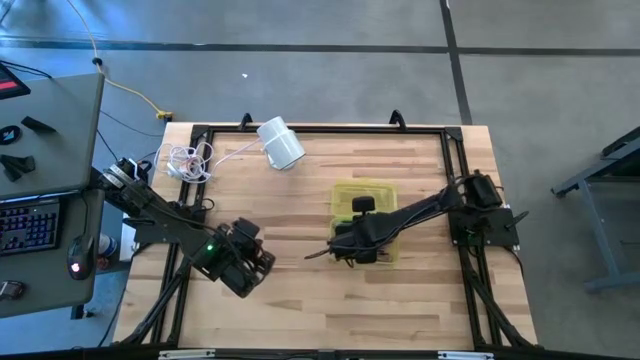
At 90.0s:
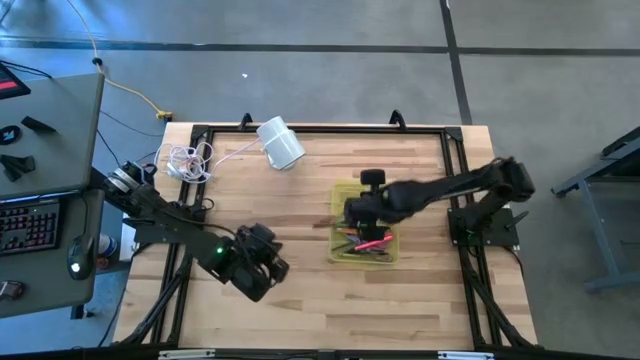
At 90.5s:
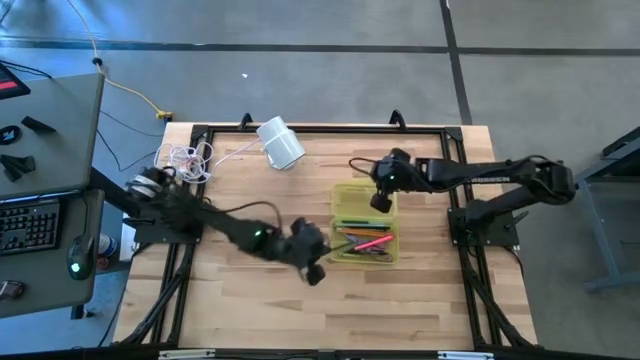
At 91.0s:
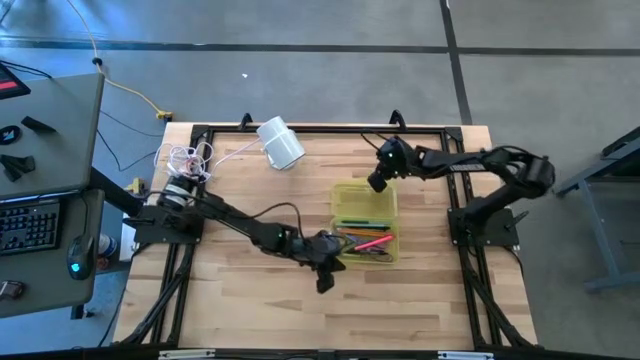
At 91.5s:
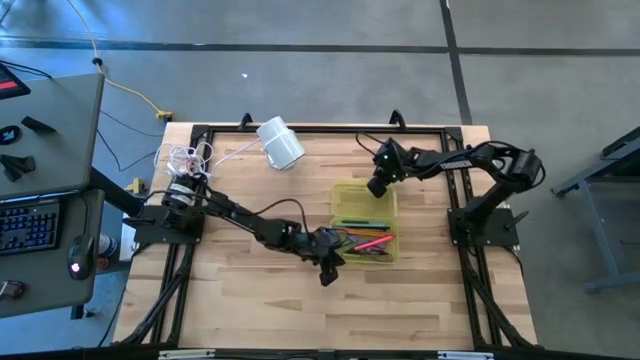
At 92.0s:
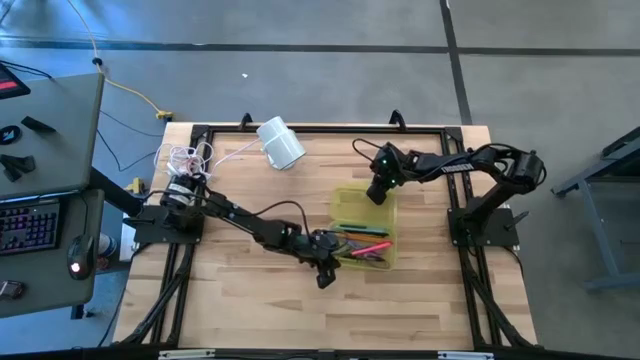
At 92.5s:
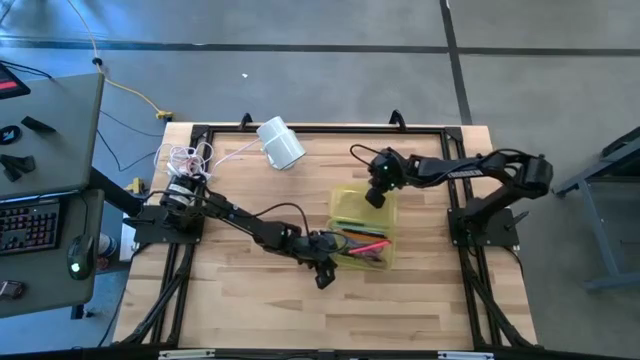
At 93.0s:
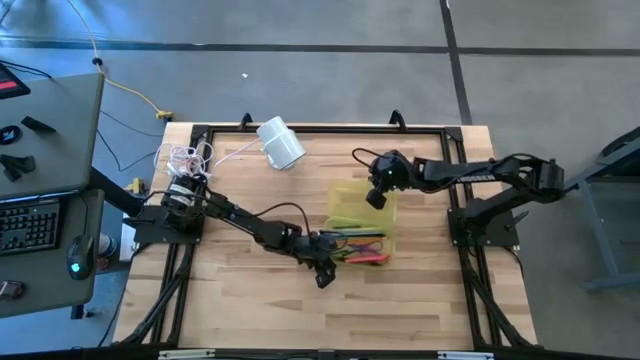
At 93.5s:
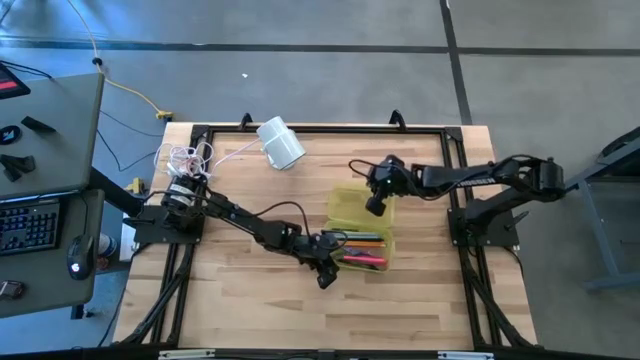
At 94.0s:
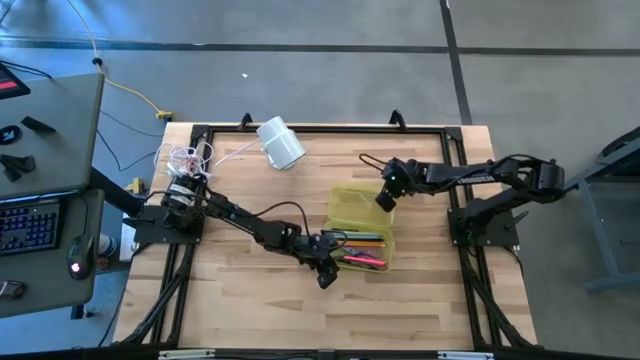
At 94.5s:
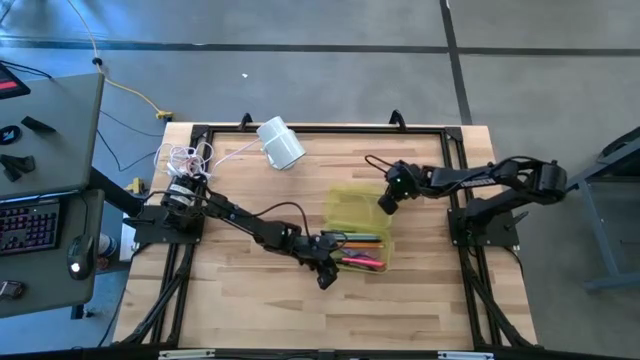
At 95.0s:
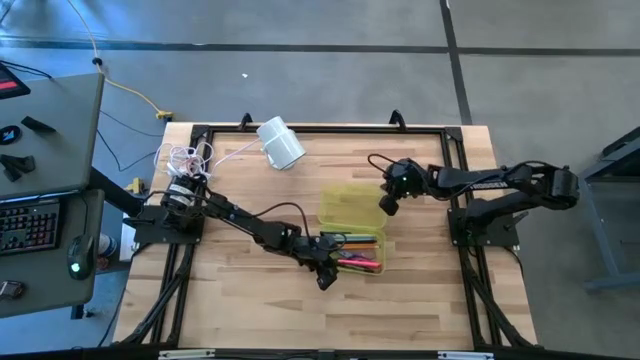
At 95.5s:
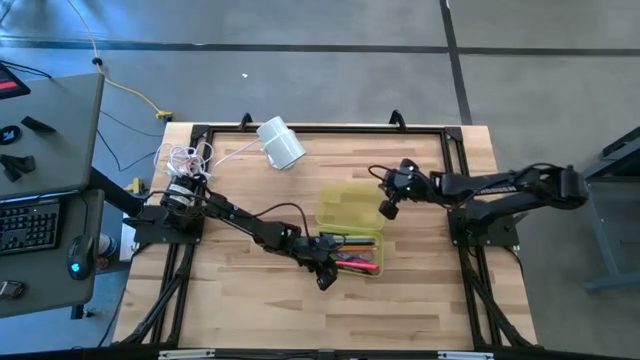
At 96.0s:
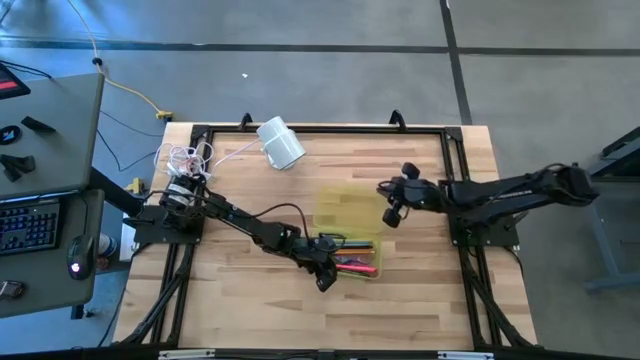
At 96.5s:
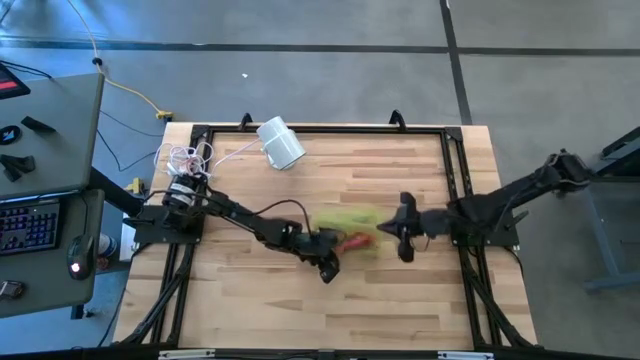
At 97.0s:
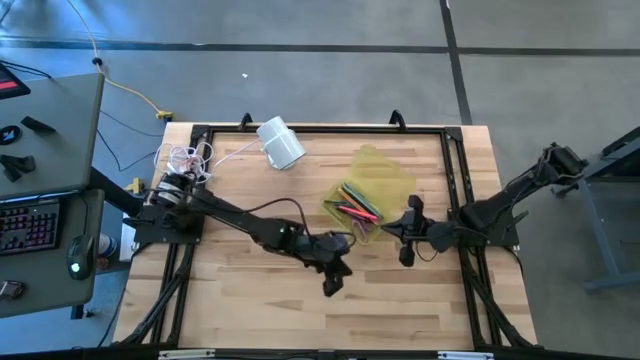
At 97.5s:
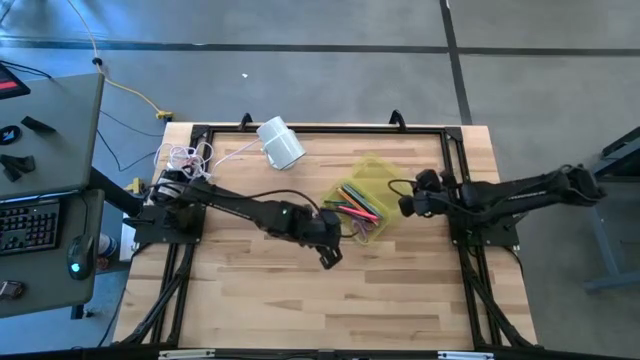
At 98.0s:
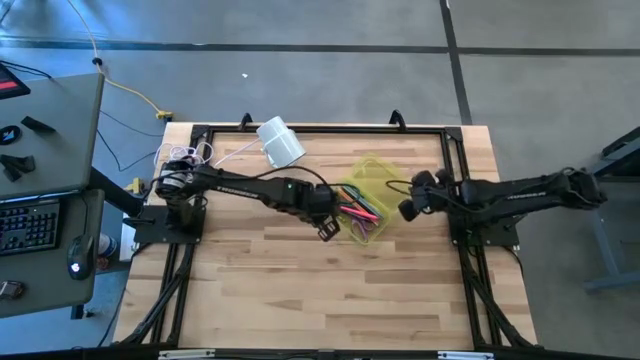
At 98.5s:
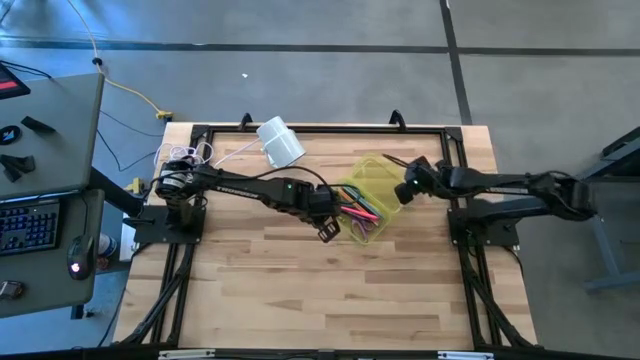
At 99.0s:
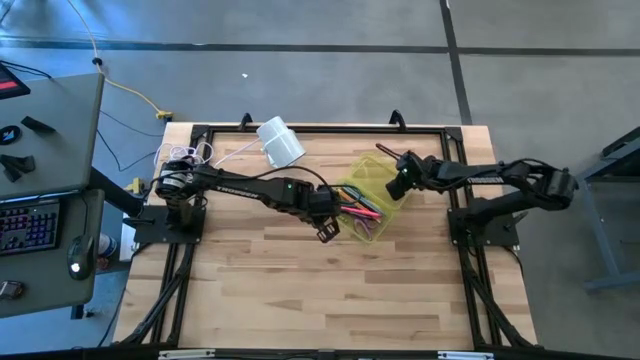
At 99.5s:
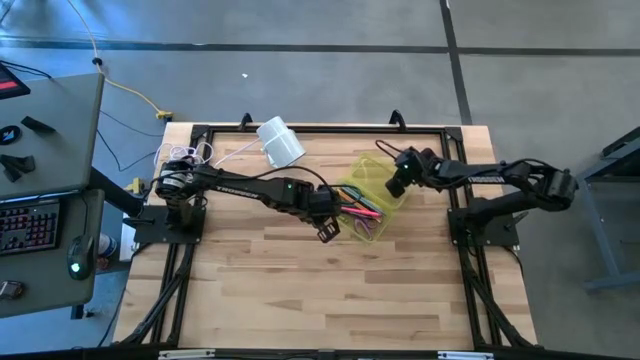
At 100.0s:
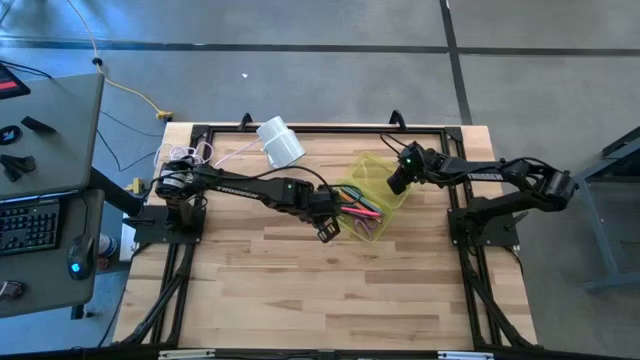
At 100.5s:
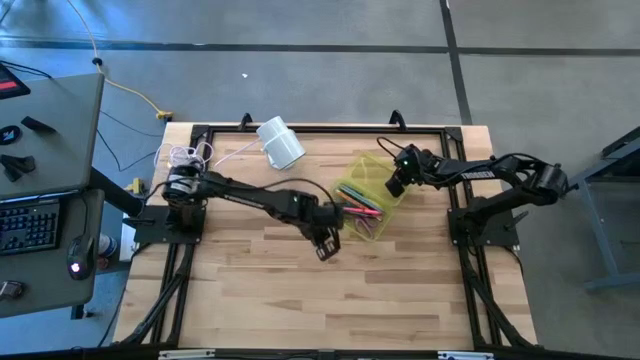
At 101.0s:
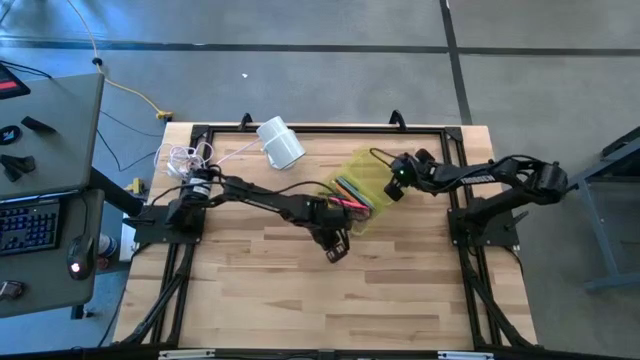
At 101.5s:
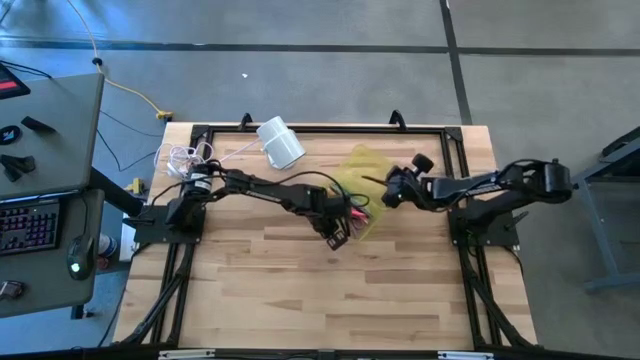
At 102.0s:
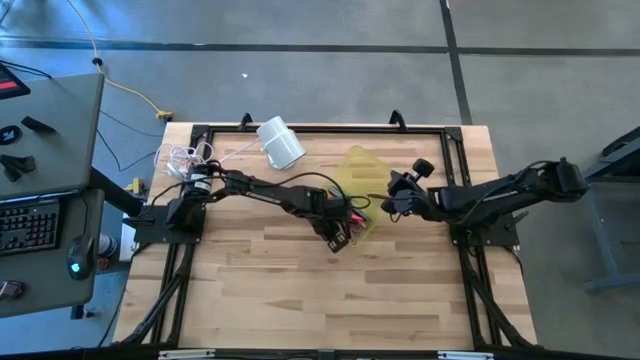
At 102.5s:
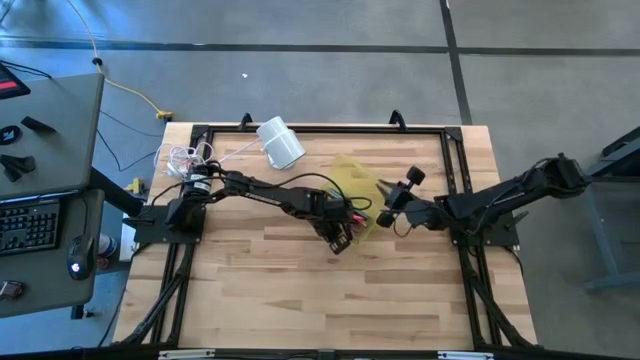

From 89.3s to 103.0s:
Task: Pick & place school supplies into a supply box
Close the supply box

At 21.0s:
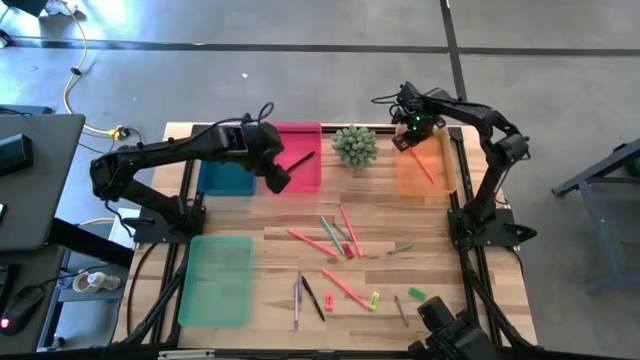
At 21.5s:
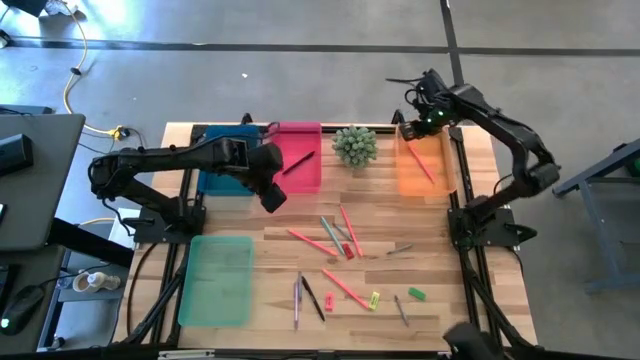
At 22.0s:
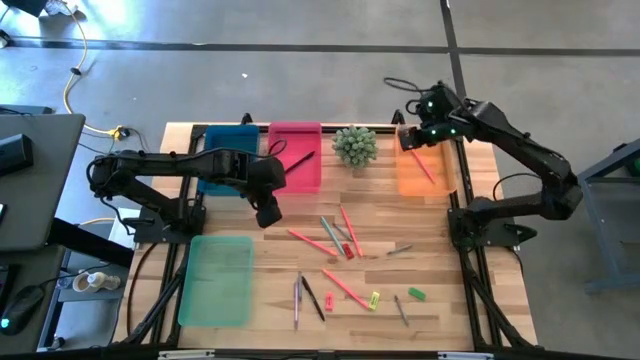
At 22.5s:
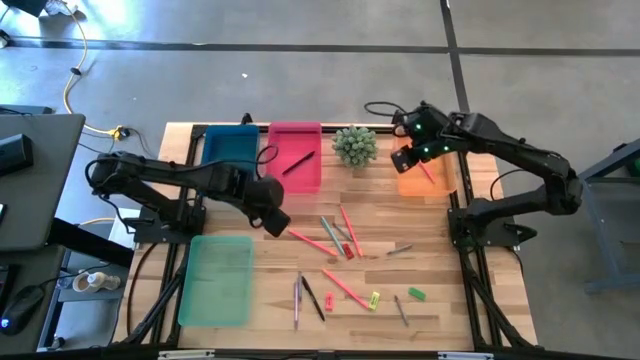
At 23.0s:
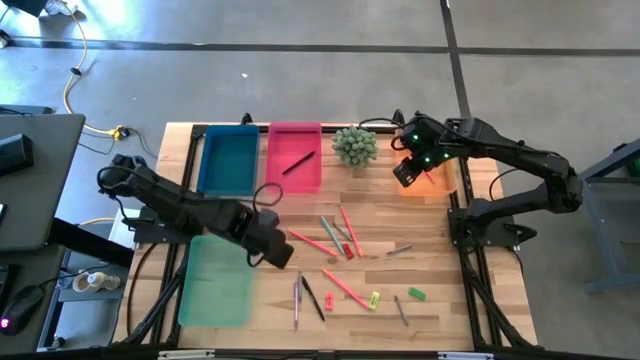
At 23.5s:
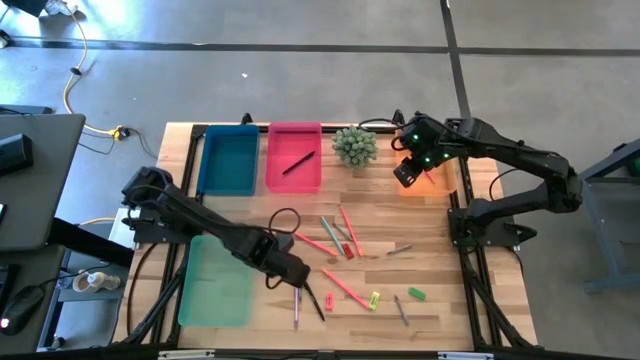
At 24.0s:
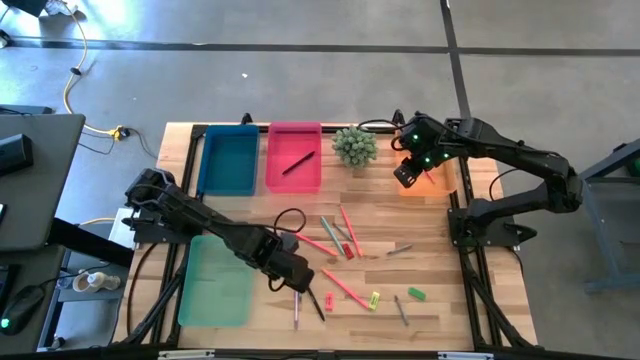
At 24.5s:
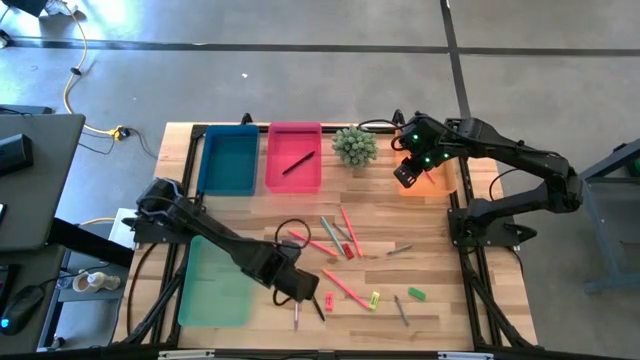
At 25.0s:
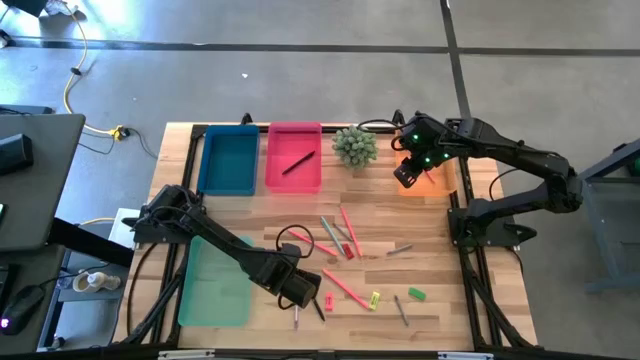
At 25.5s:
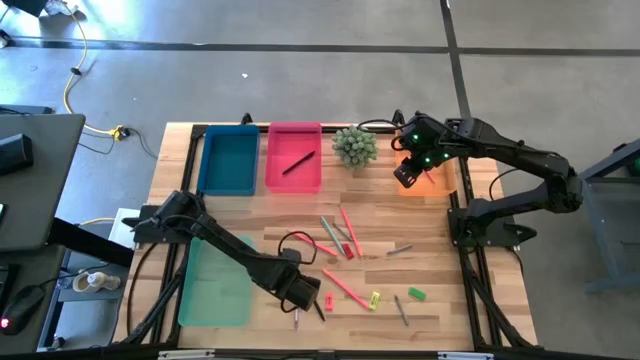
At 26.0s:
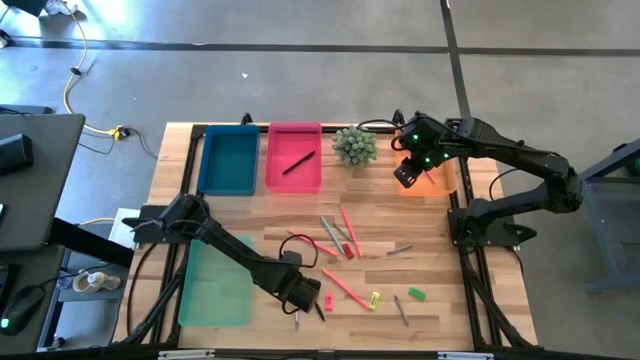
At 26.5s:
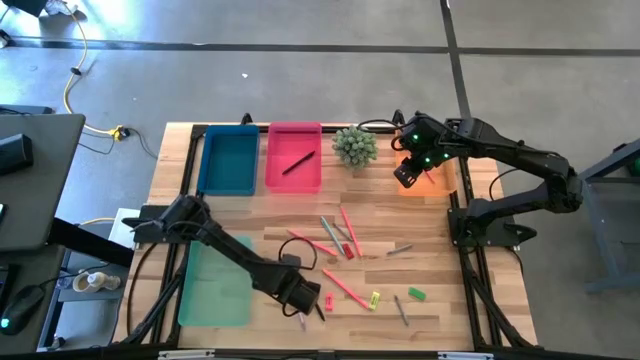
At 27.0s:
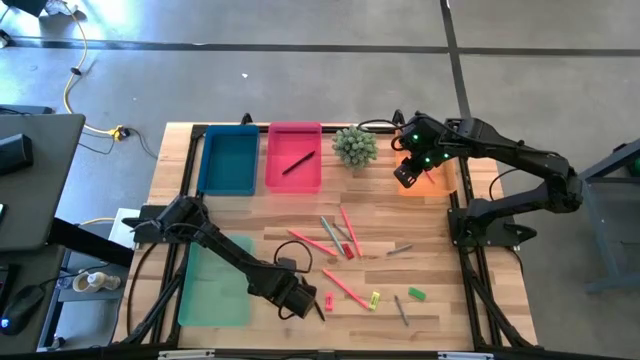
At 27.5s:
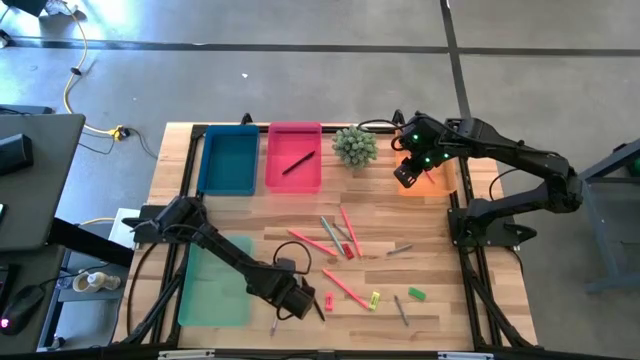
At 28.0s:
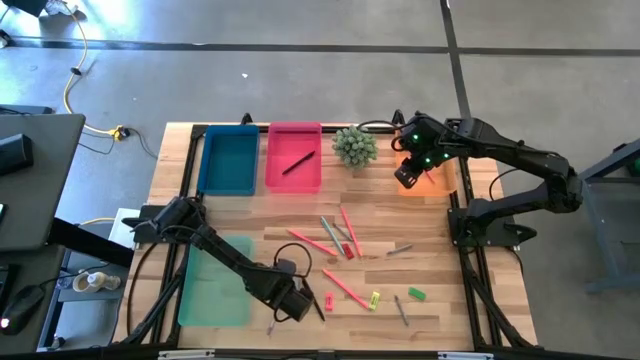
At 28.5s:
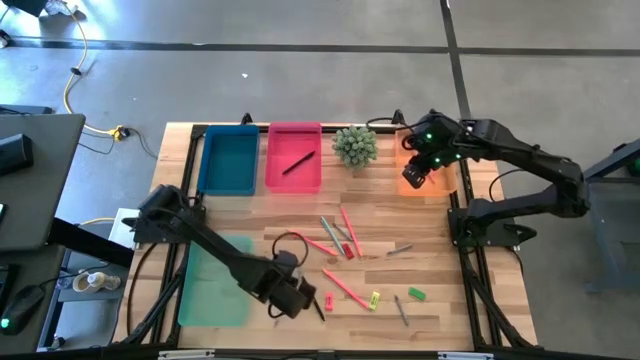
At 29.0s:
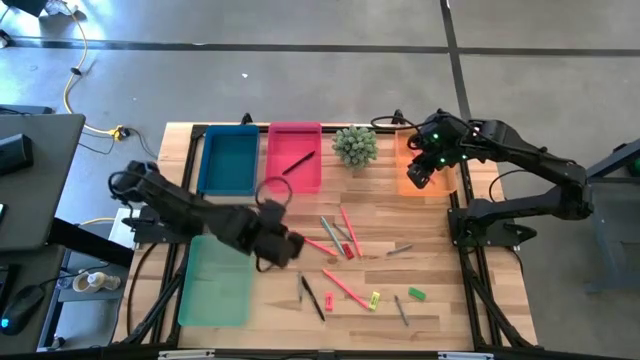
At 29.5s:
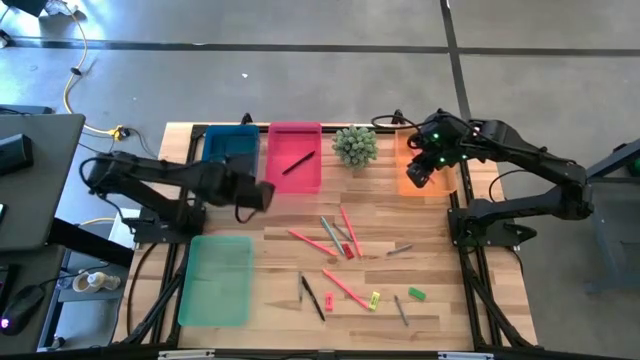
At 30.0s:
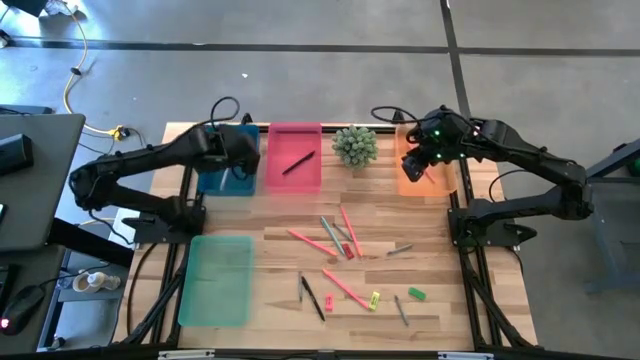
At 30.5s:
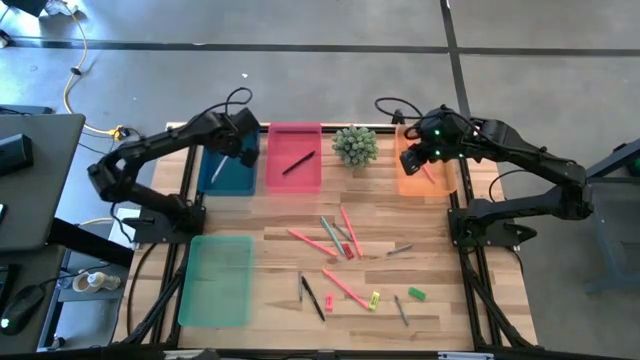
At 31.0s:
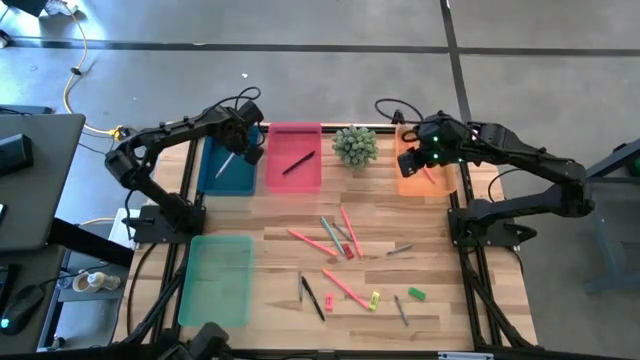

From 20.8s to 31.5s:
Task: Sort crayons/erasers/pens/pencils in bins
Put the purple pen into the pink bin
